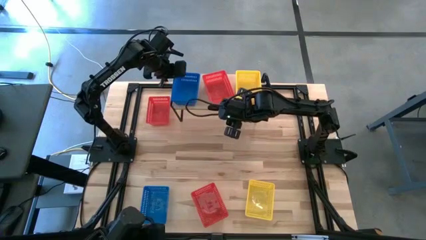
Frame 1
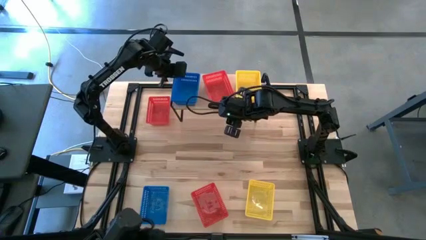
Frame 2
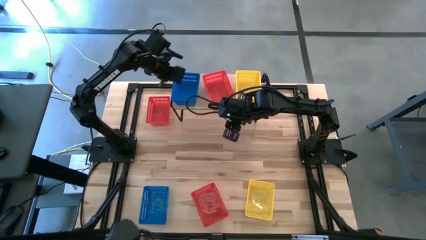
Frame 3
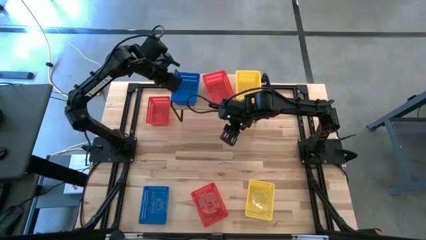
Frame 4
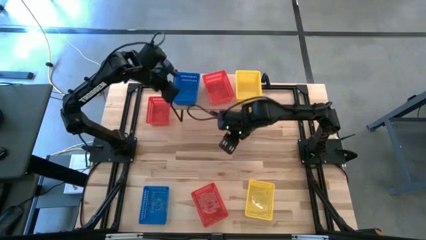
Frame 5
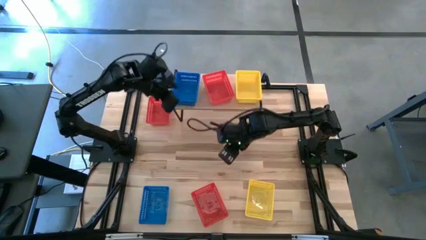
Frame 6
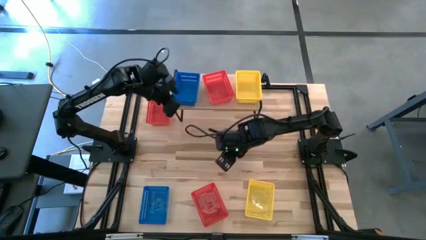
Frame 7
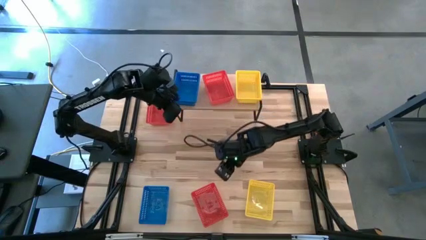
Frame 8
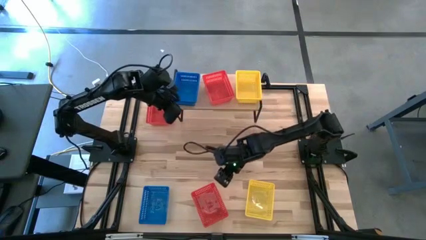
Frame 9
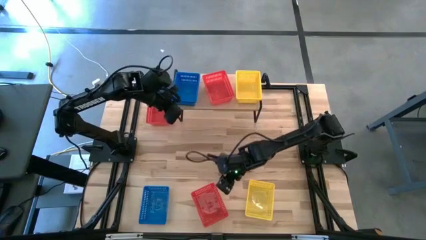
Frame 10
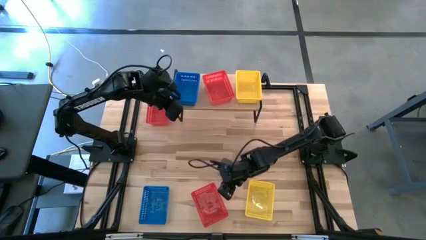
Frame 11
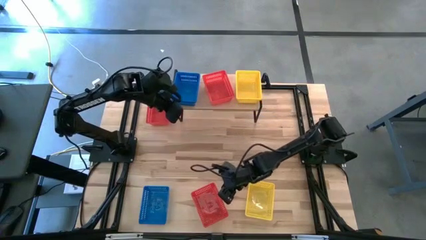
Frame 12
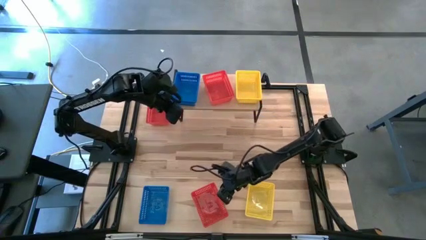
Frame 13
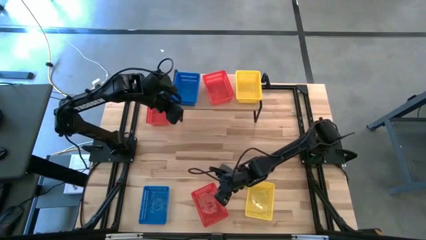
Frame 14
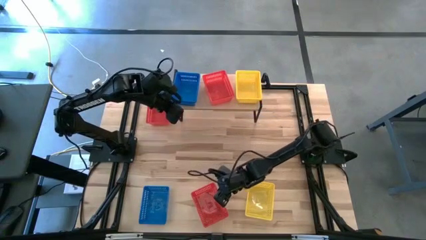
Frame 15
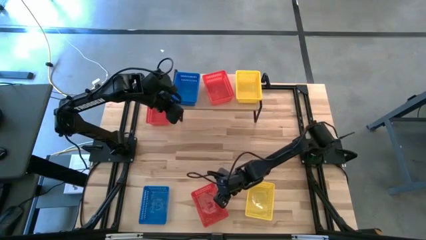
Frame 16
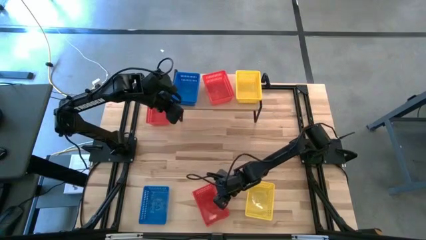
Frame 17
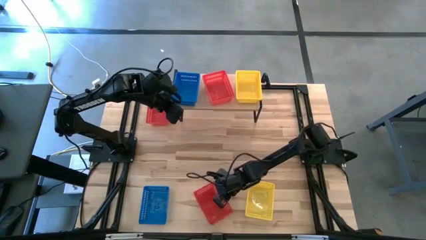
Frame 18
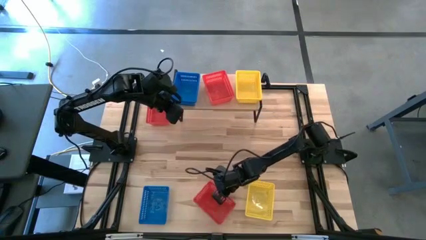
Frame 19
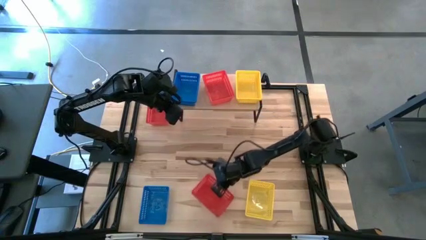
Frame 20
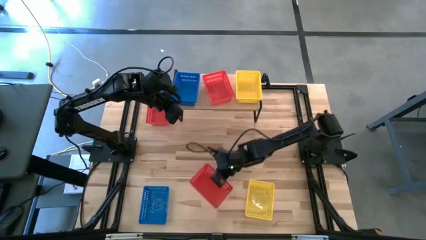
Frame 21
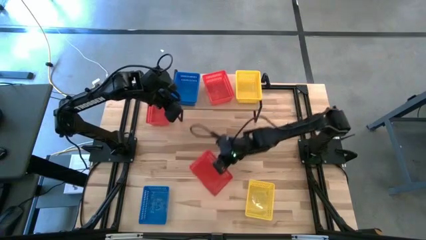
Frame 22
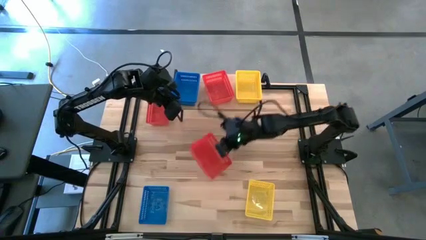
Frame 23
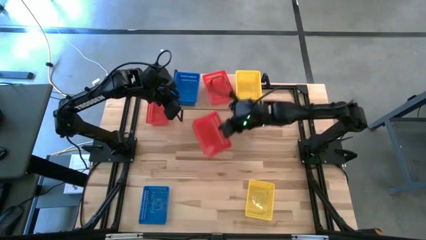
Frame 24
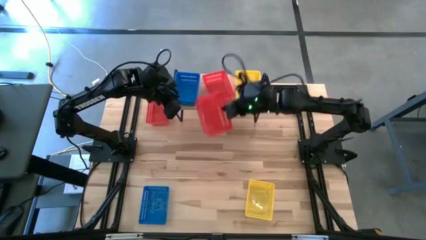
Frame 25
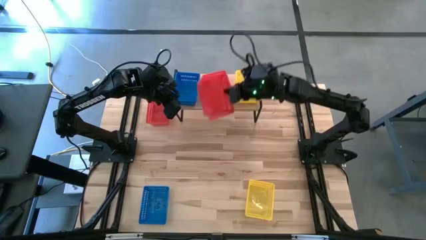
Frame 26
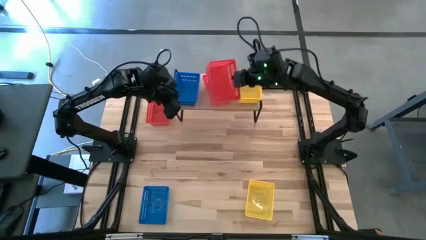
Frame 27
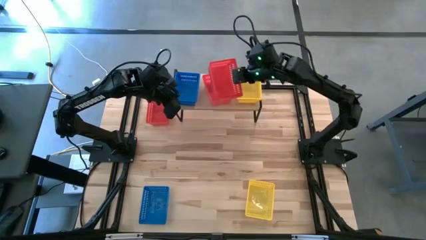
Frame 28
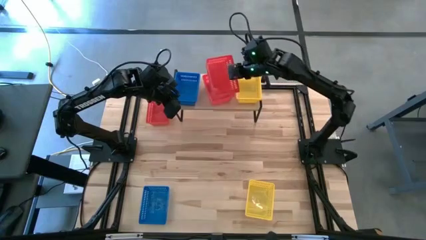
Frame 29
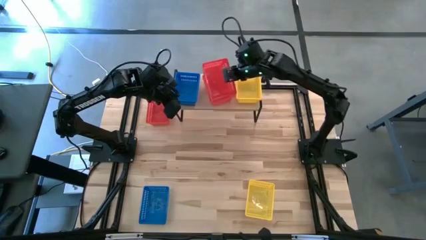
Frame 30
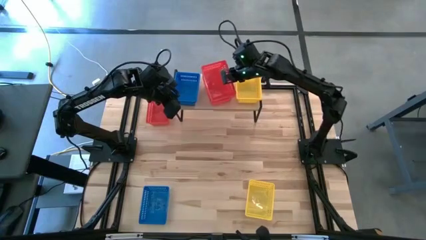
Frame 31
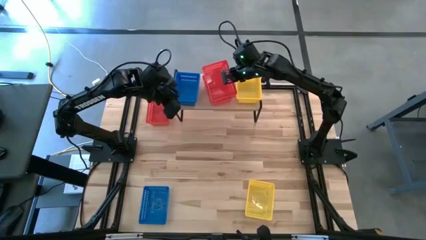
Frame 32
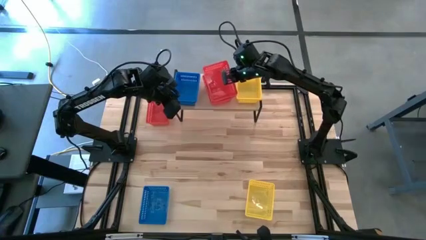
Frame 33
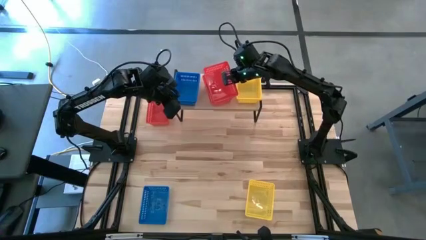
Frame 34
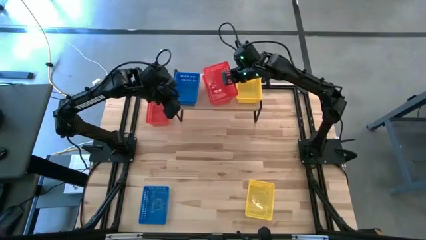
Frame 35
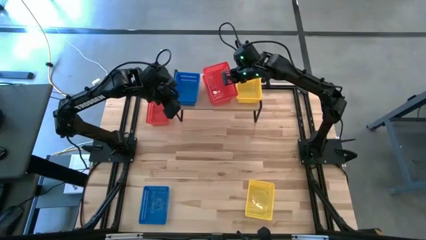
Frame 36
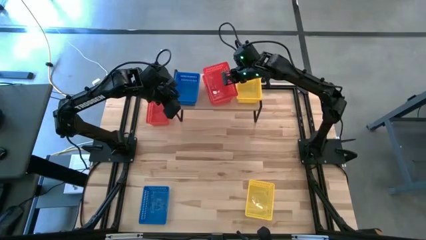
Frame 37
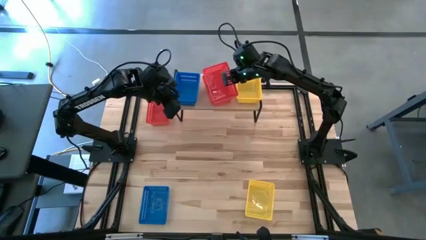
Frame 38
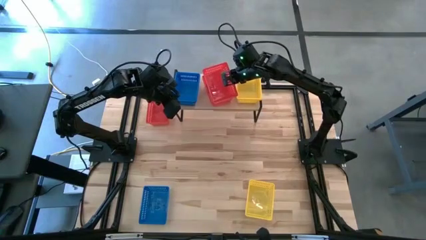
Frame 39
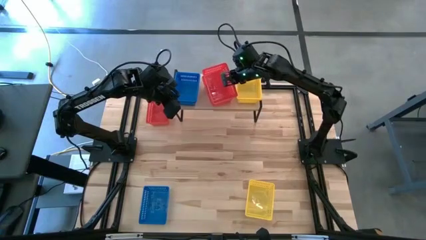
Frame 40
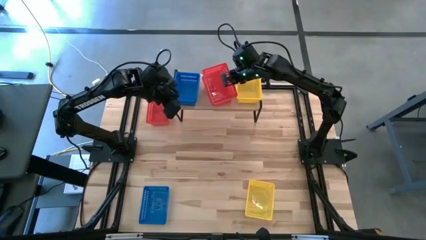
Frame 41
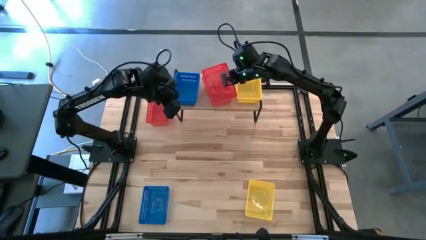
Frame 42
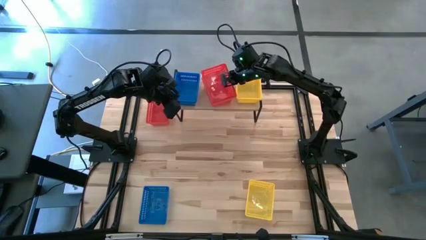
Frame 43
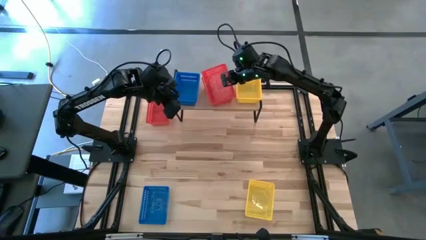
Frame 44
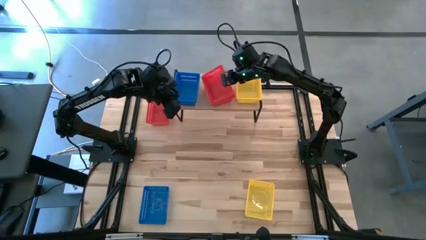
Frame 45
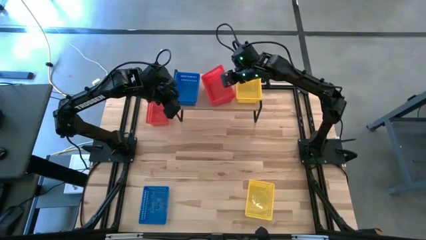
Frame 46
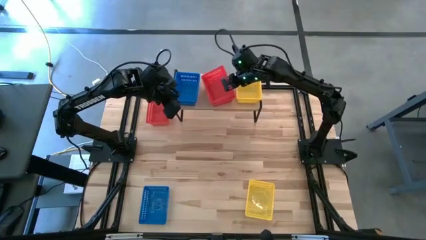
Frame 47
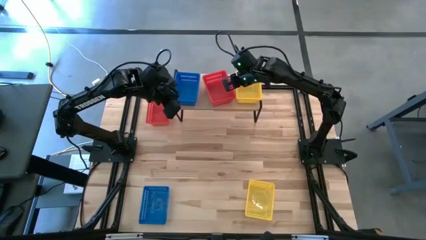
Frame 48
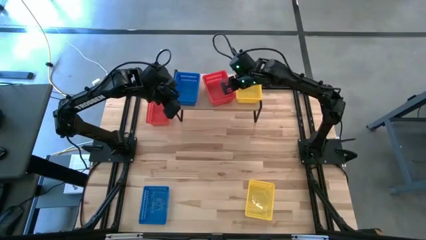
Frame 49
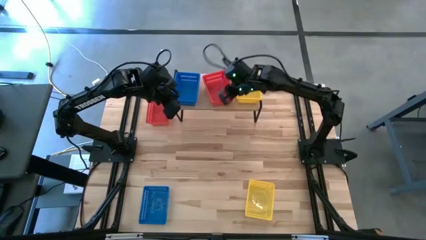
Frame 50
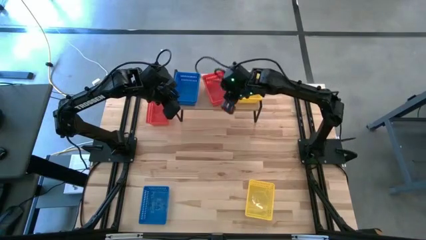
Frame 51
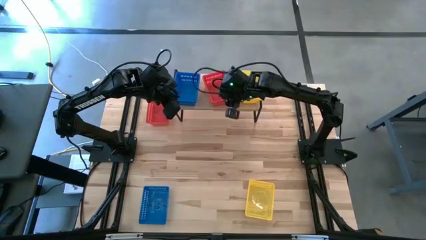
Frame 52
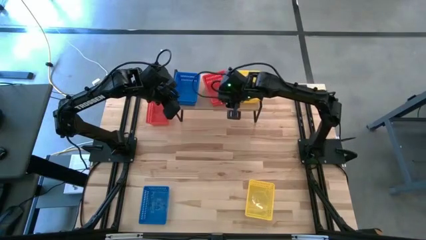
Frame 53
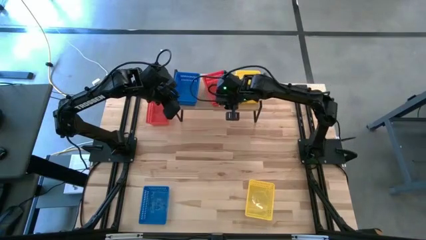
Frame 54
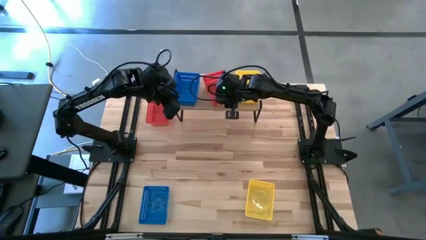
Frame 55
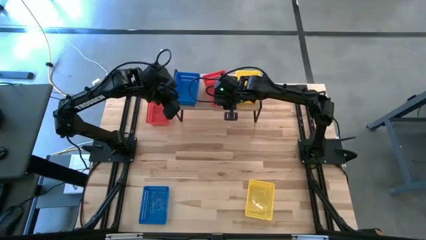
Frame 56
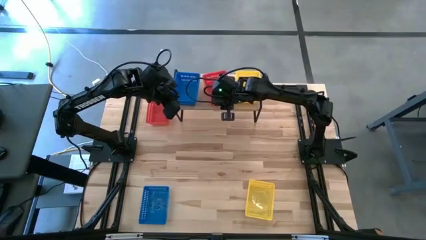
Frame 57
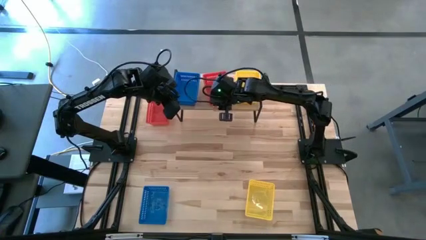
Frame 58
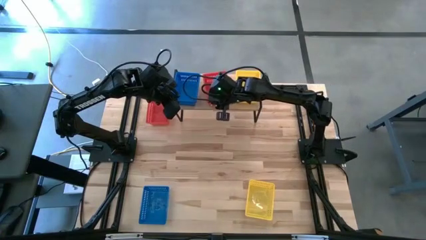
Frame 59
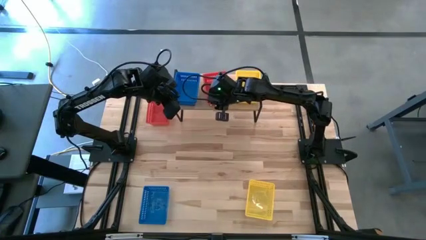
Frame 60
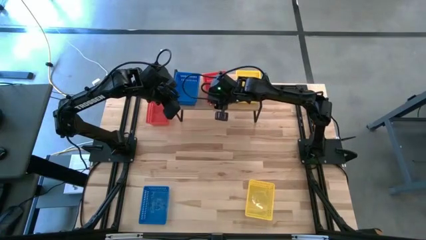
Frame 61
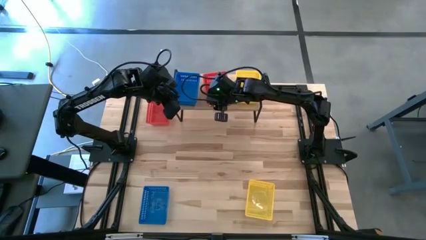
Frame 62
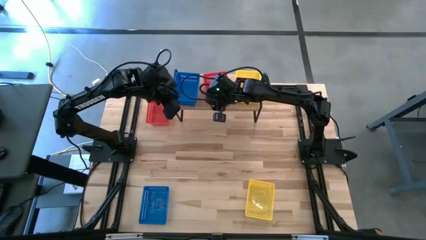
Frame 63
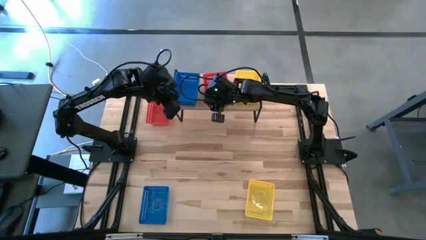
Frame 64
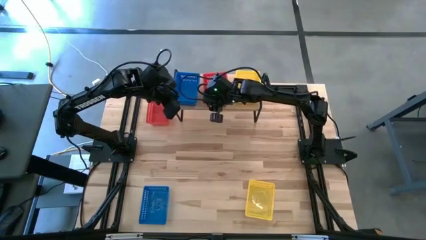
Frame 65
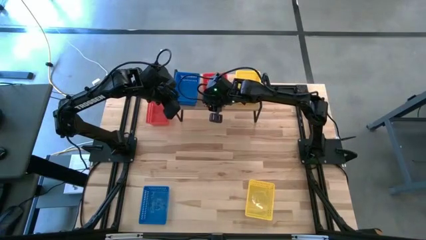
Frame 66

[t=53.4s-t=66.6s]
Task: Stack baskets on shelf by color
Stack the bottom red basket into the other red basket on the shelf
